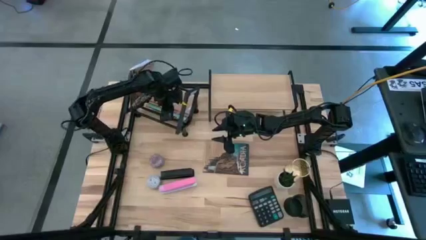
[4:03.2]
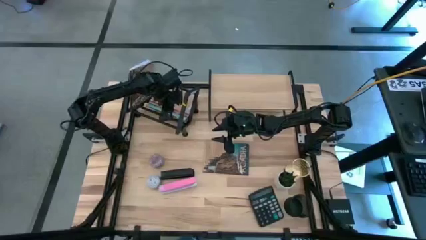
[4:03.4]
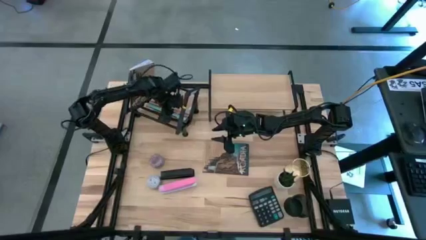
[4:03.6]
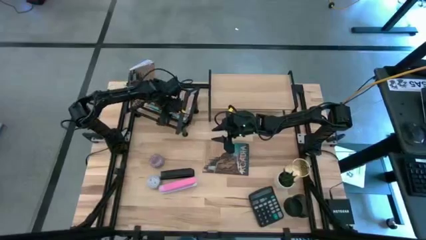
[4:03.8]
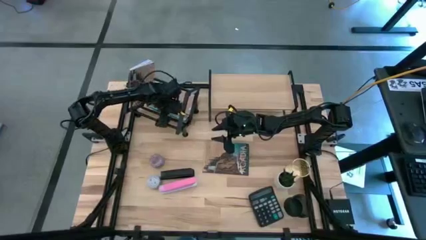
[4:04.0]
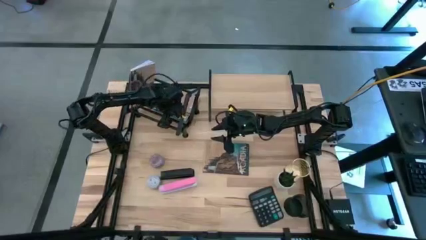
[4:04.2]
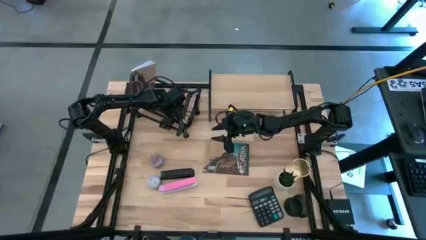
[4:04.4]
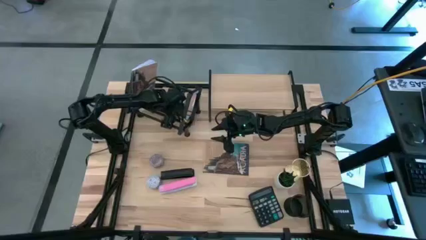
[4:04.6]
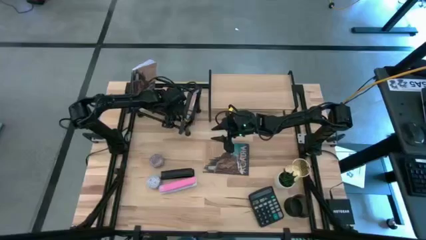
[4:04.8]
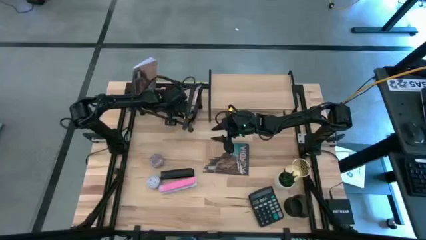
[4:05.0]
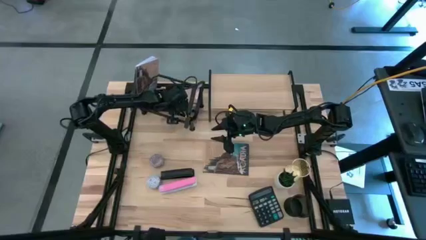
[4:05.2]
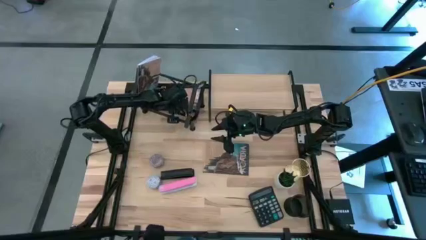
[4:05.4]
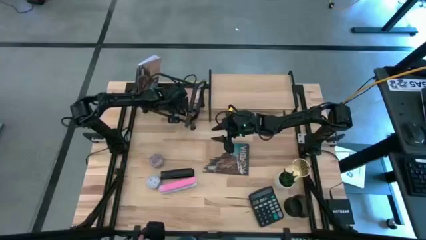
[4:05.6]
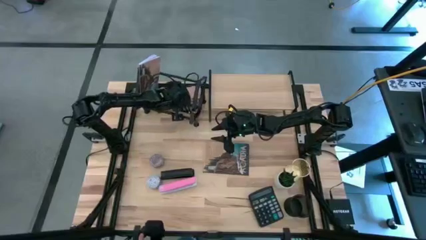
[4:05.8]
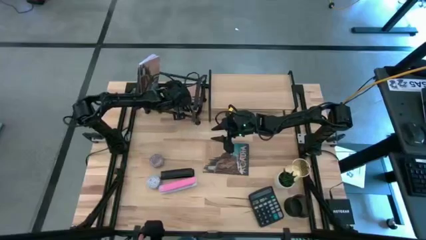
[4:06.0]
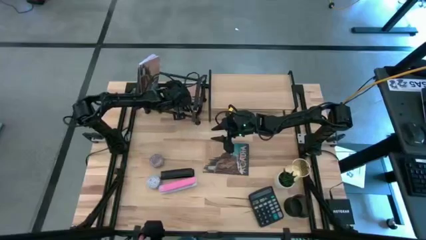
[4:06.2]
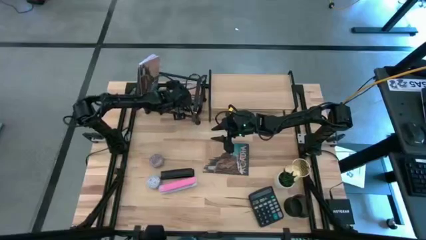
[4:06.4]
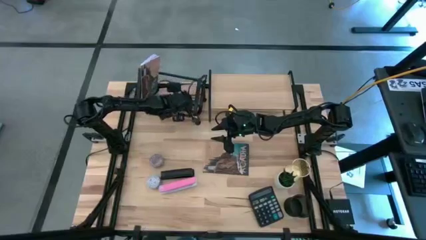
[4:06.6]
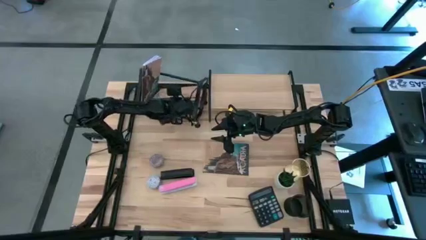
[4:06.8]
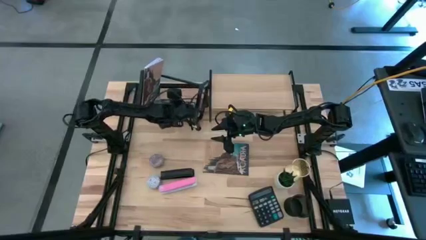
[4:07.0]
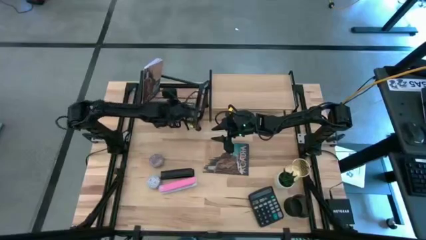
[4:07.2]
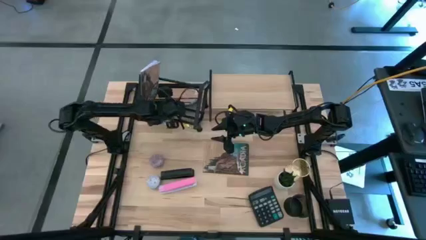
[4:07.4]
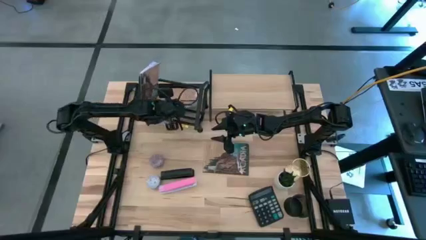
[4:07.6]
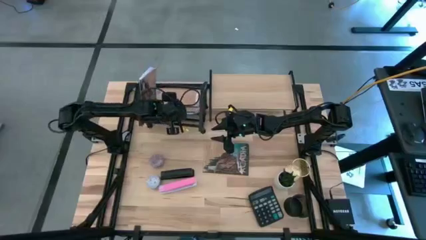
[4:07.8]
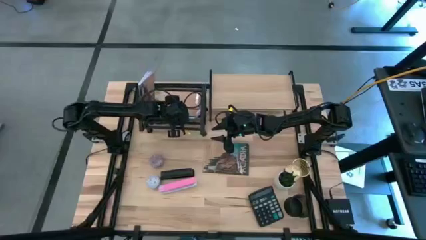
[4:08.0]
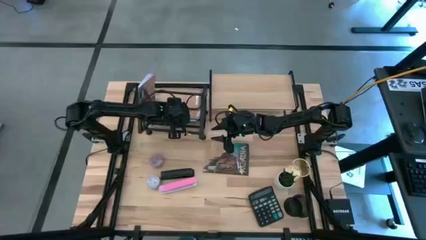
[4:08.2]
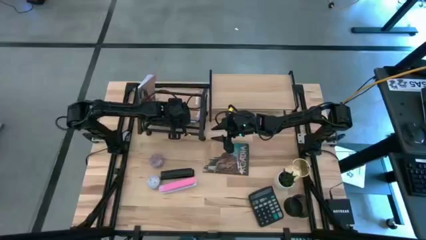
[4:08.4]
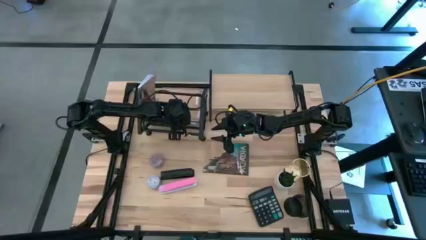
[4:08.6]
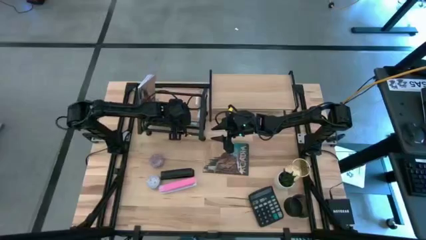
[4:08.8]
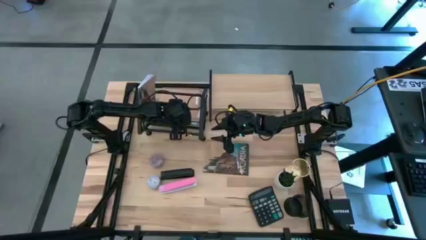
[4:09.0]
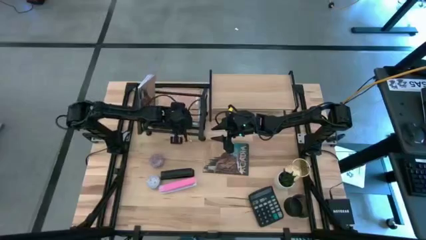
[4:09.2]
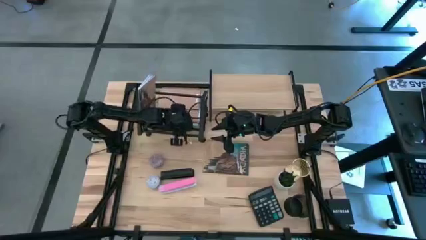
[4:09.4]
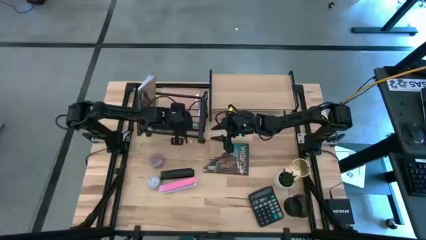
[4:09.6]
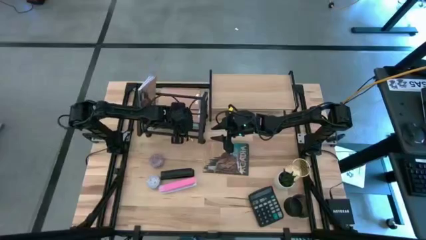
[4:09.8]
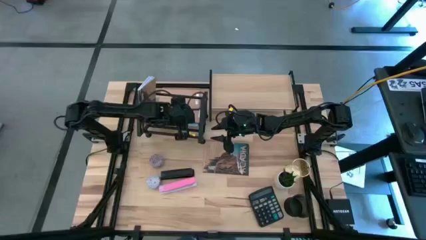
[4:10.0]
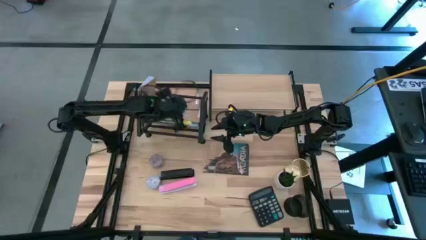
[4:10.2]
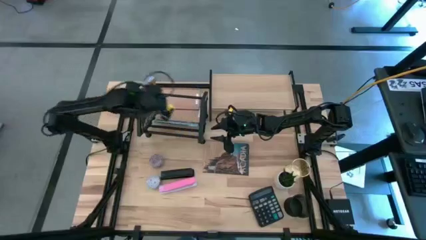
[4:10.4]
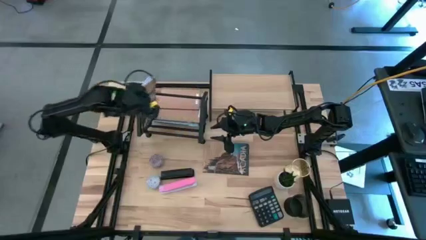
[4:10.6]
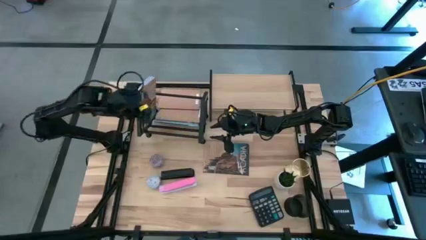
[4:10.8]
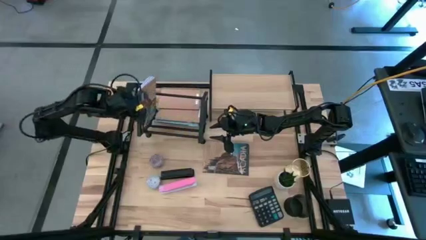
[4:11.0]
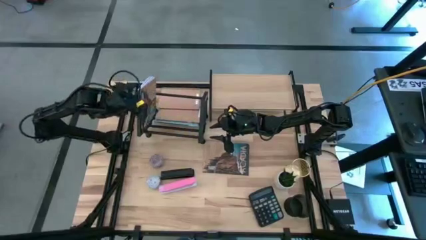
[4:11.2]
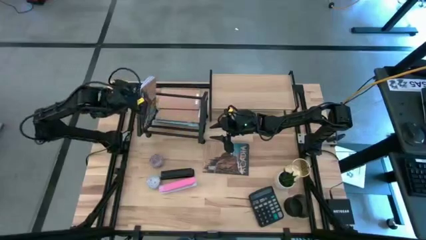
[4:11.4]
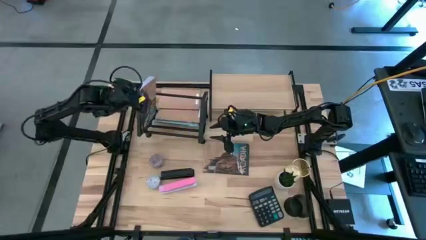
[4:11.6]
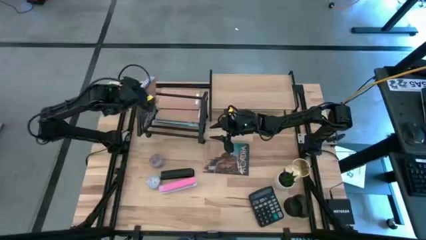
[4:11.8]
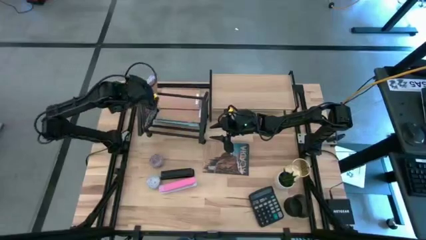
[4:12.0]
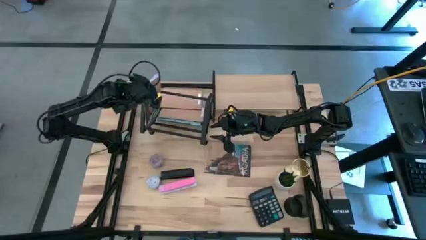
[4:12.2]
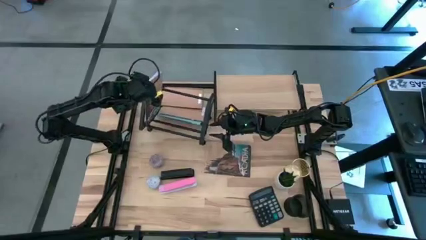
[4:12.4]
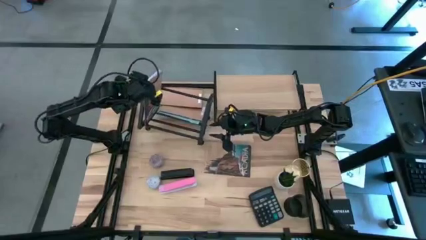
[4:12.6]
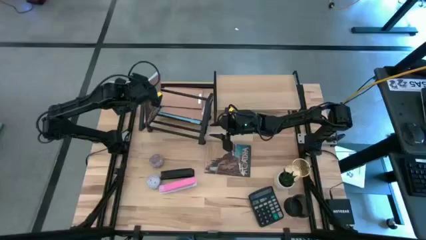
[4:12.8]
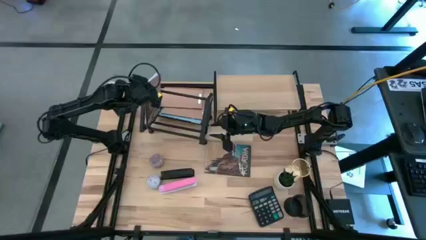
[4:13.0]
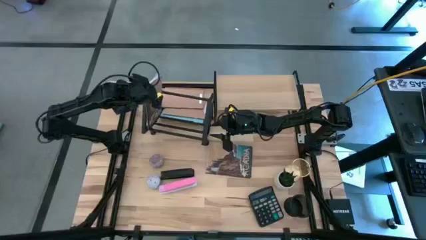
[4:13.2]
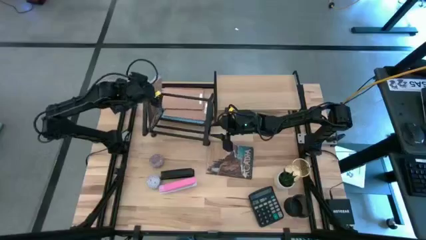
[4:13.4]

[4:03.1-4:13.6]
Task: Stock shelves
Remove the brown book from the book holder

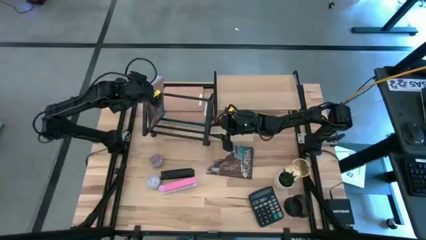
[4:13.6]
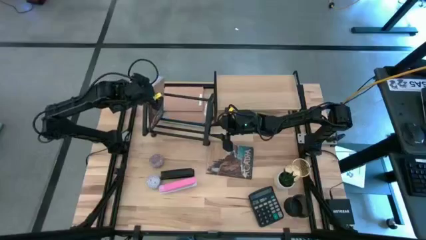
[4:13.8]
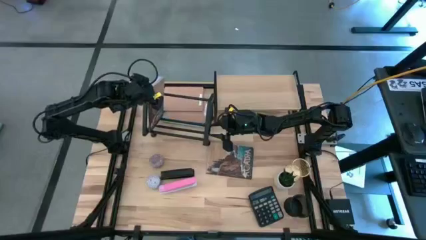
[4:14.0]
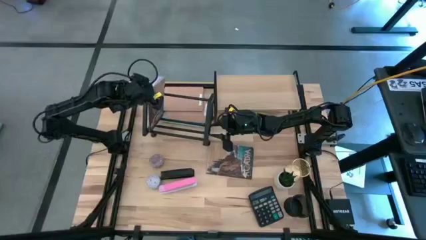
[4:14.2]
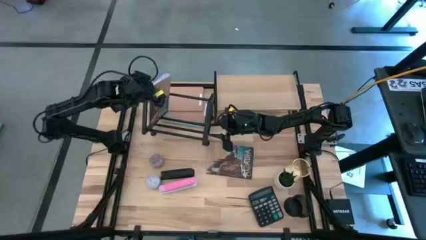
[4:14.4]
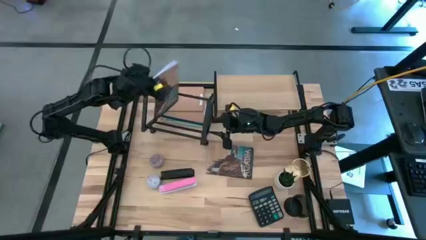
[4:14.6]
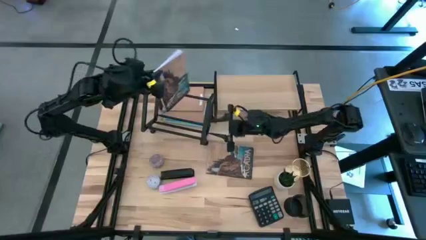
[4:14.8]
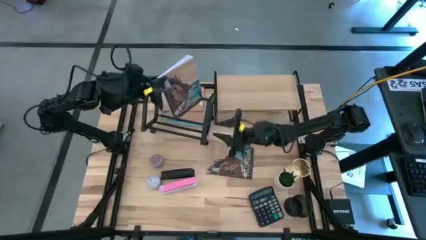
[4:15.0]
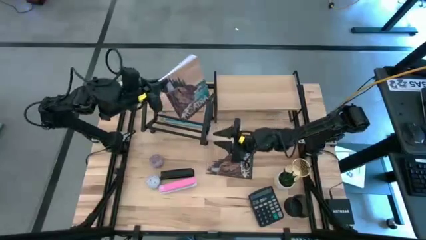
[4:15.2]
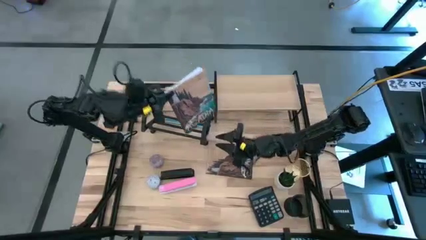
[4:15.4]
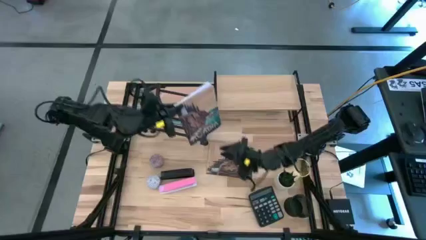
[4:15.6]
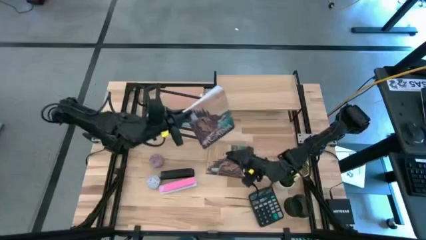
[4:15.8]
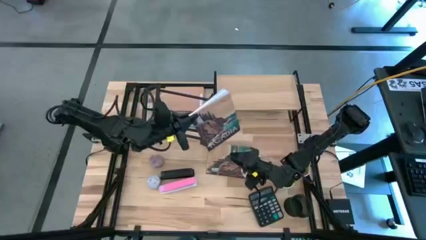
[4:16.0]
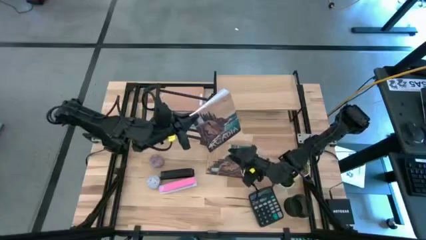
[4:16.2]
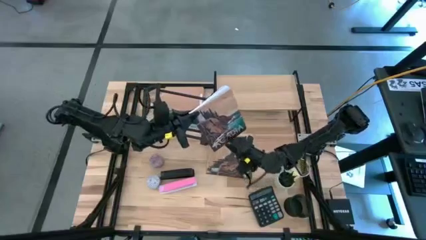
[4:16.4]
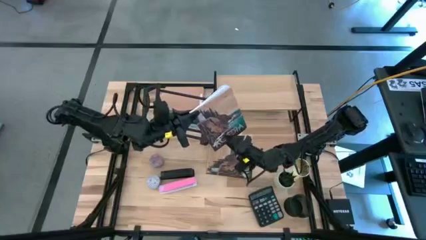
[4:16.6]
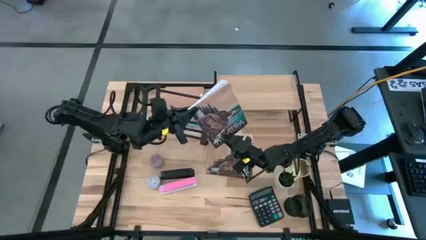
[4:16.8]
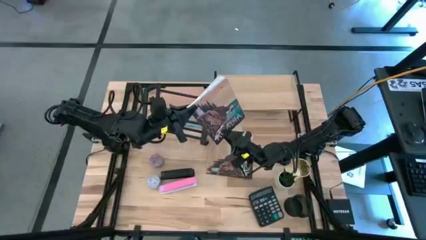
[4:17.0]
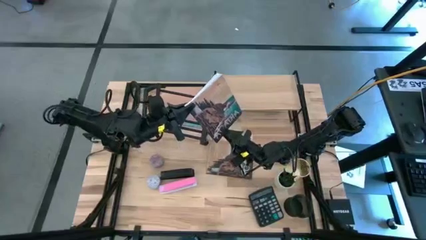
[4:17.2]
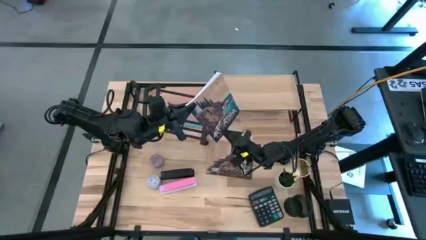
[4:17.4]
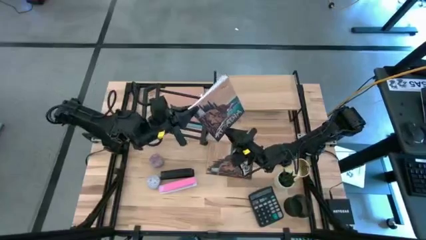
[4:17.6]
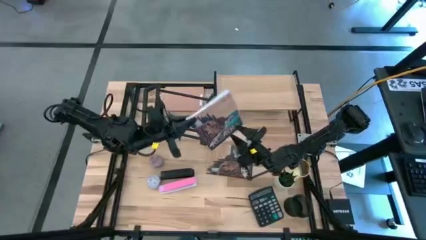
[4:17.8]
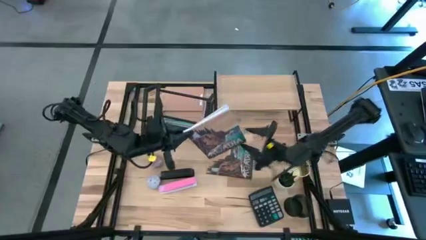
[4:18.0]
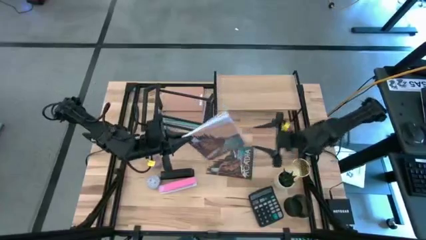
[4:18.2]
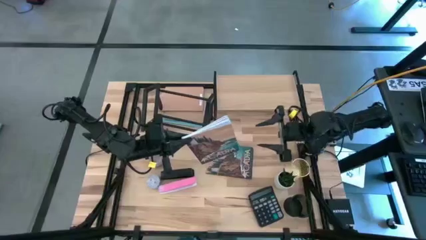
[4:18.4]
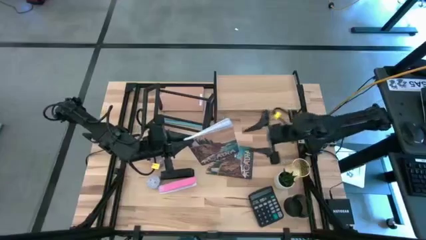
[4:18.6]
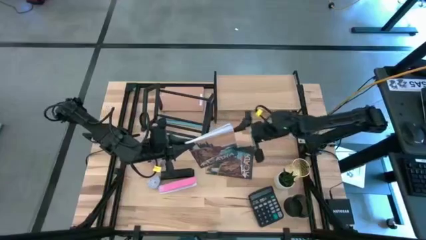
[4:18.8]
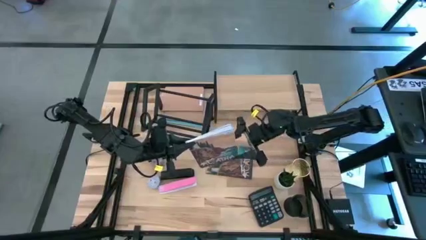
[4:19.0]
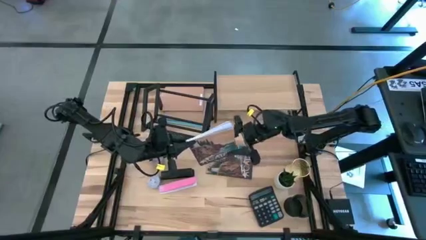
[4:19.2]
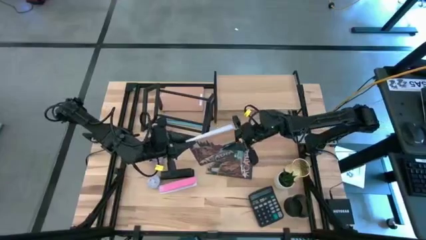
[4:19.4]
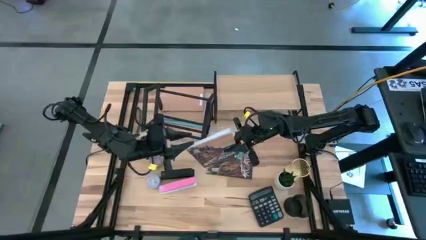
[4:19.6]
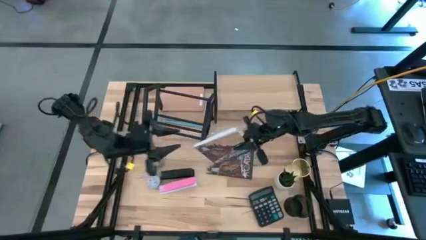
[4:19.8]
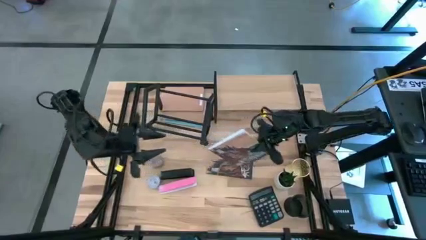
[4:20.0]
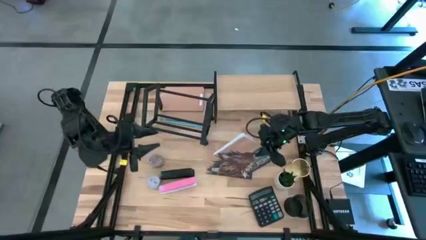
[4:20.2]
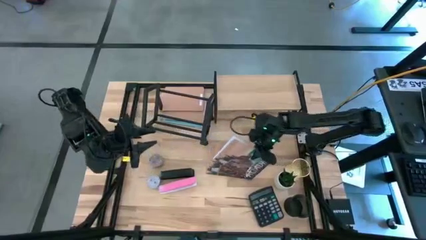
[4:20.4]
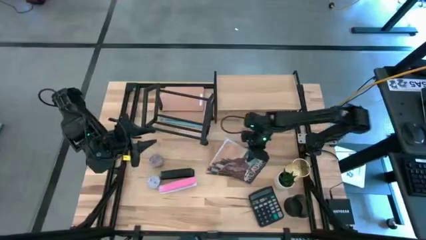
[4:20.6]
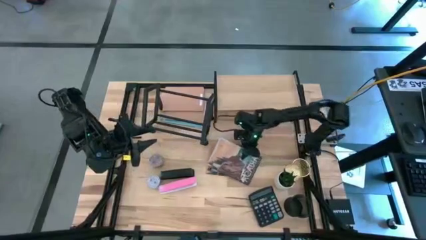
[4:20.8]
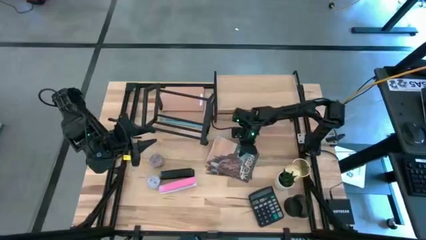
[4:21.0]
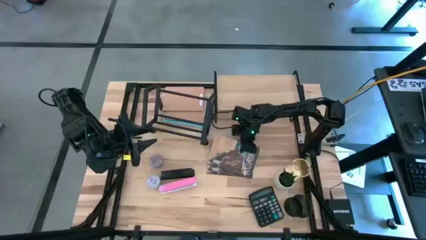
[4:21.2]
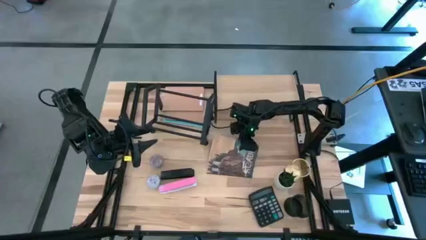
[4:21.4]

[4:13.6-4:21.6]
Remove the brown book from the book holder
